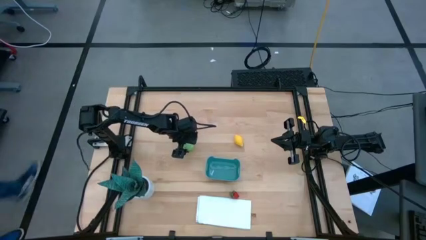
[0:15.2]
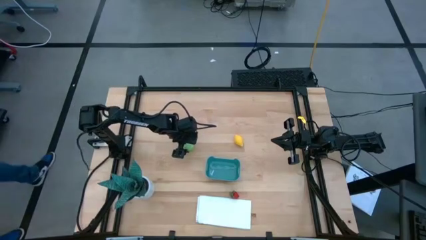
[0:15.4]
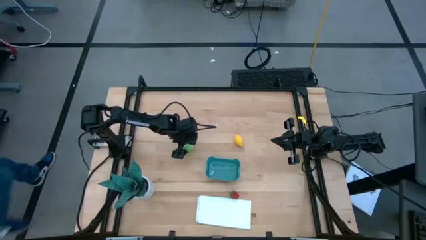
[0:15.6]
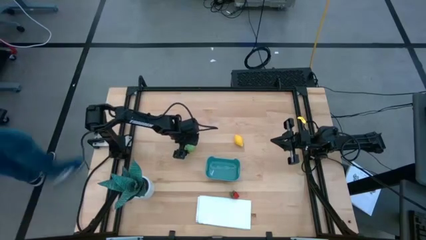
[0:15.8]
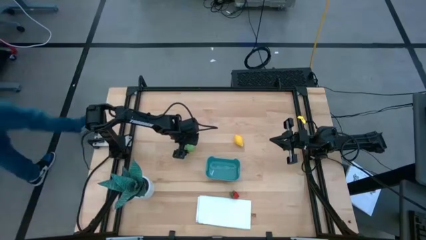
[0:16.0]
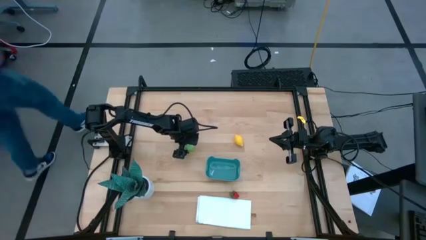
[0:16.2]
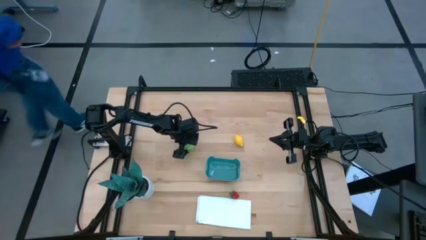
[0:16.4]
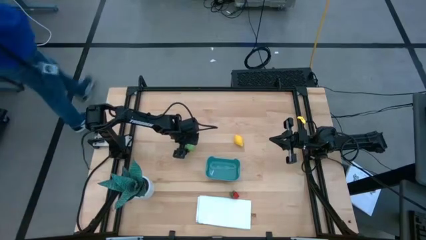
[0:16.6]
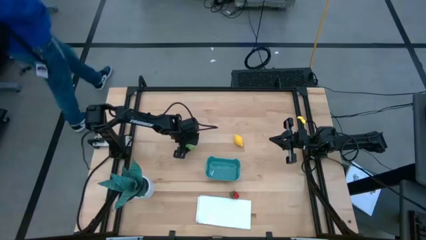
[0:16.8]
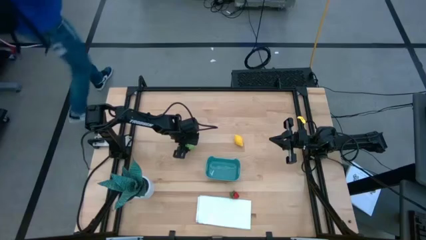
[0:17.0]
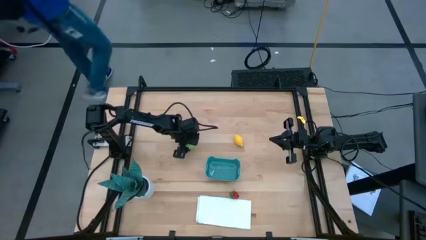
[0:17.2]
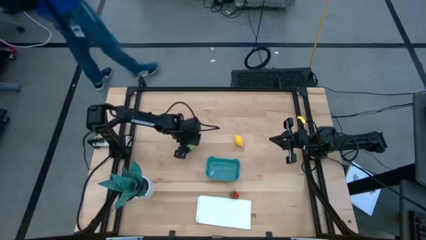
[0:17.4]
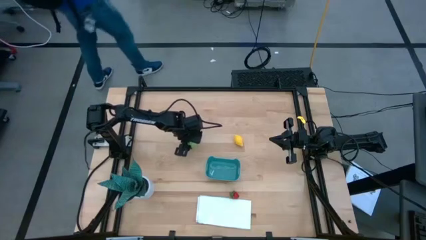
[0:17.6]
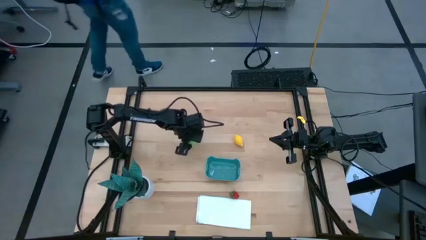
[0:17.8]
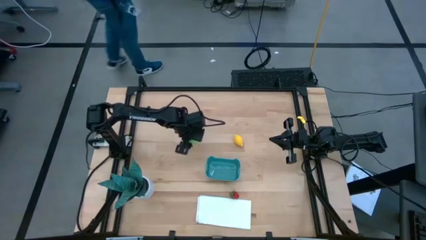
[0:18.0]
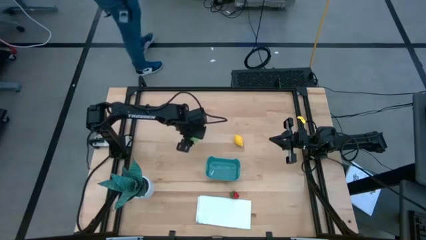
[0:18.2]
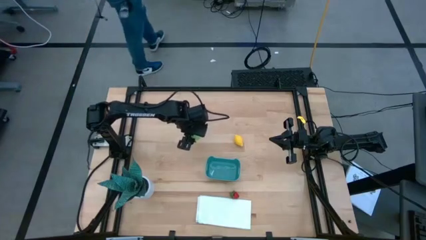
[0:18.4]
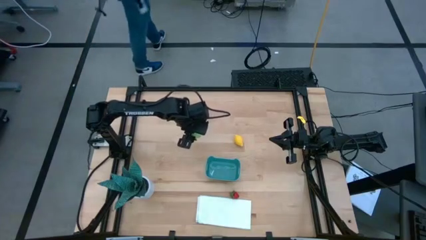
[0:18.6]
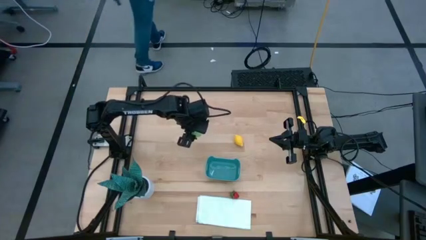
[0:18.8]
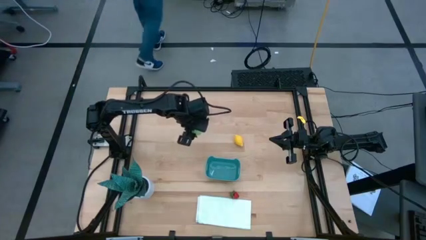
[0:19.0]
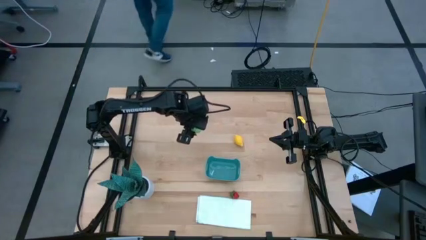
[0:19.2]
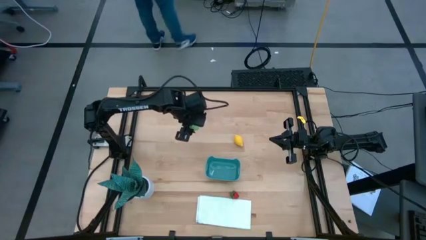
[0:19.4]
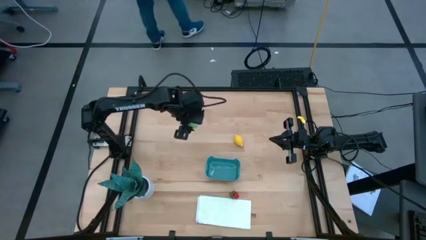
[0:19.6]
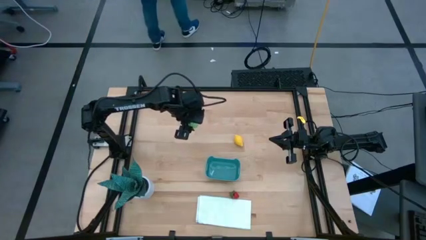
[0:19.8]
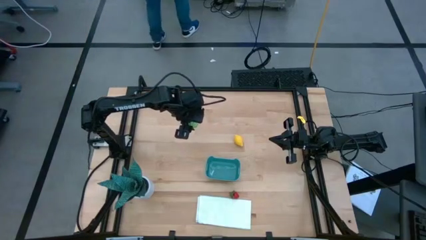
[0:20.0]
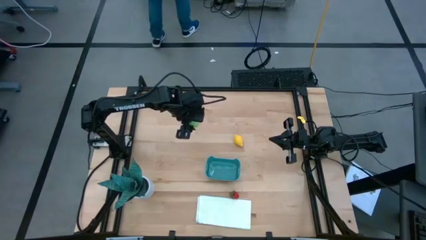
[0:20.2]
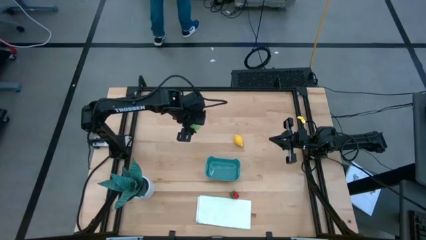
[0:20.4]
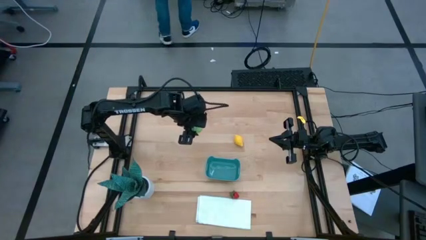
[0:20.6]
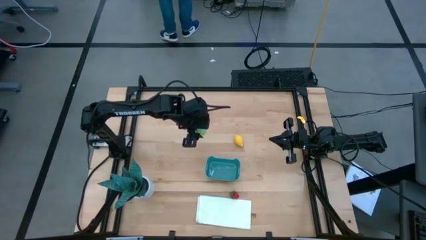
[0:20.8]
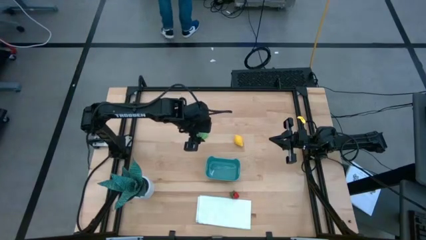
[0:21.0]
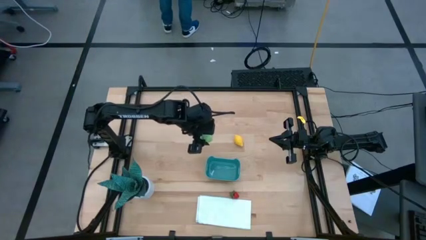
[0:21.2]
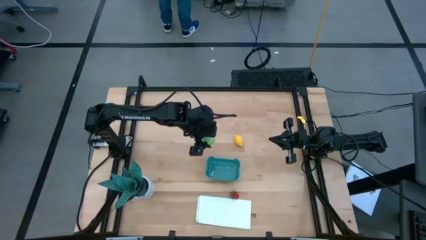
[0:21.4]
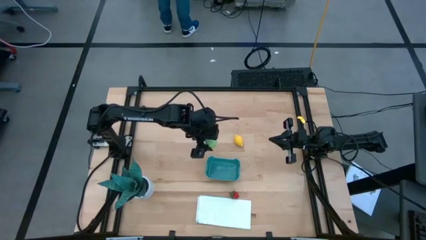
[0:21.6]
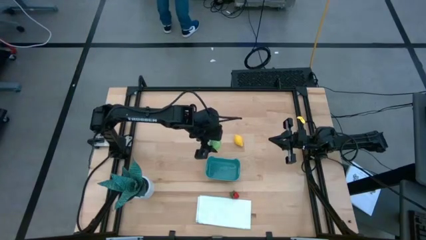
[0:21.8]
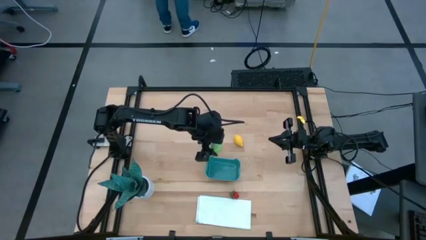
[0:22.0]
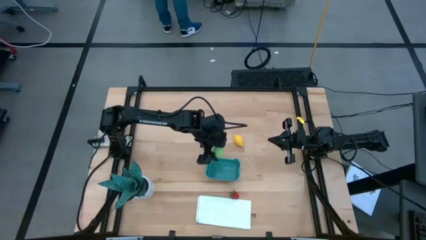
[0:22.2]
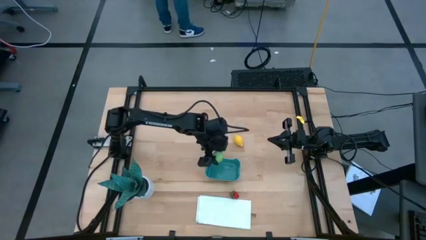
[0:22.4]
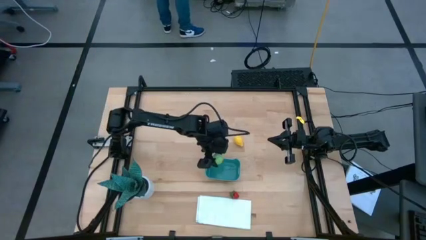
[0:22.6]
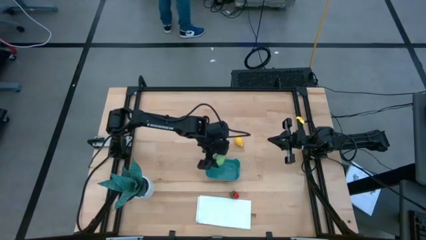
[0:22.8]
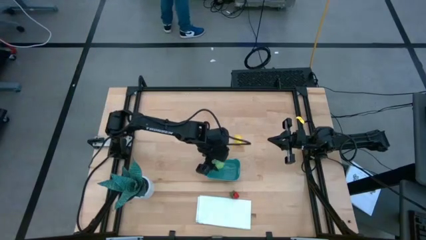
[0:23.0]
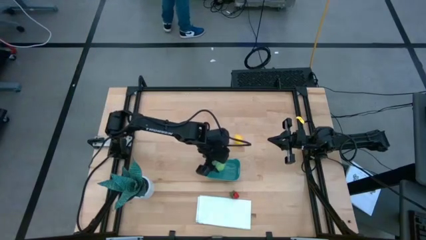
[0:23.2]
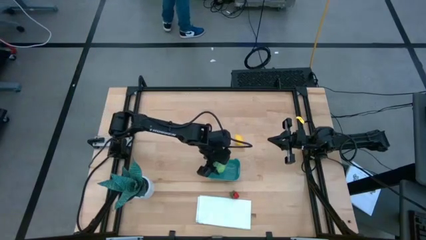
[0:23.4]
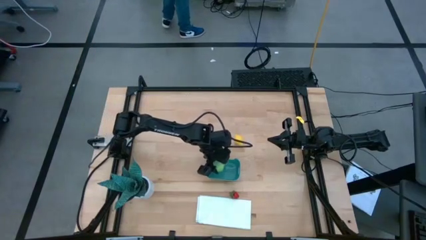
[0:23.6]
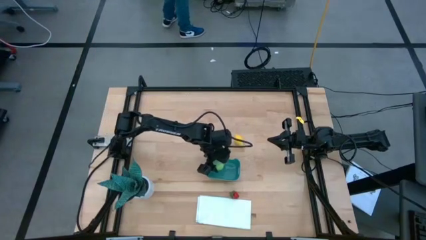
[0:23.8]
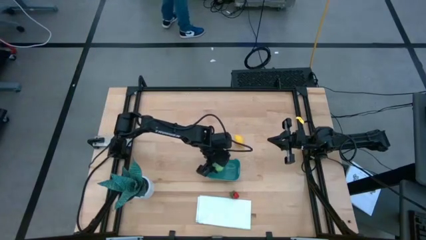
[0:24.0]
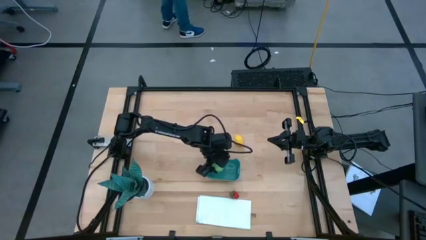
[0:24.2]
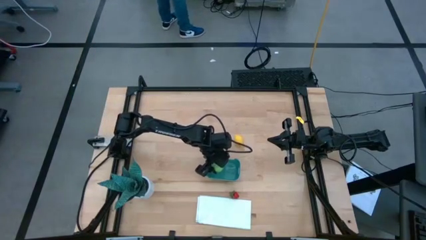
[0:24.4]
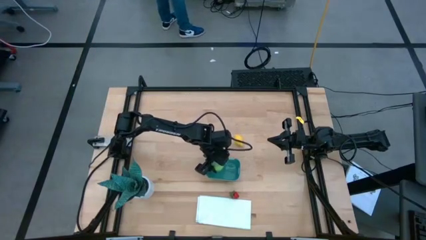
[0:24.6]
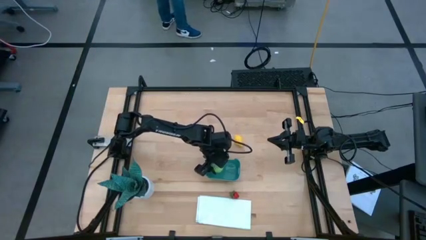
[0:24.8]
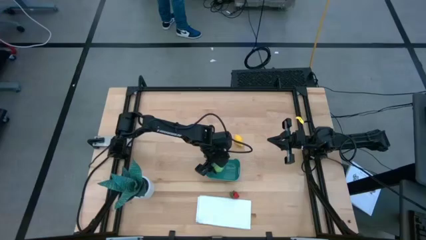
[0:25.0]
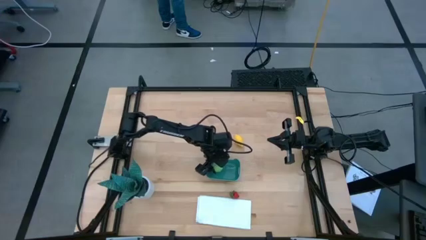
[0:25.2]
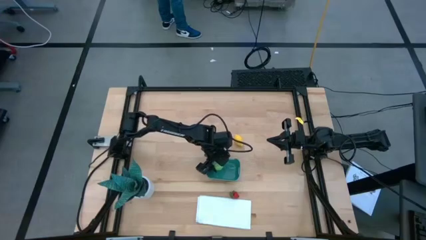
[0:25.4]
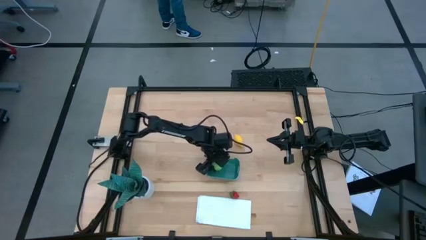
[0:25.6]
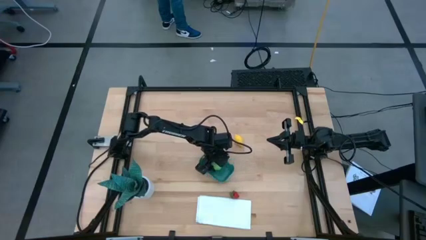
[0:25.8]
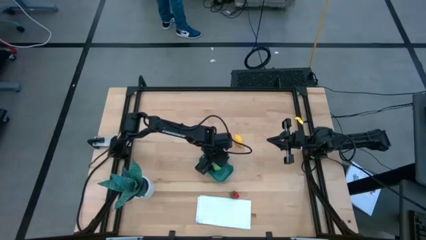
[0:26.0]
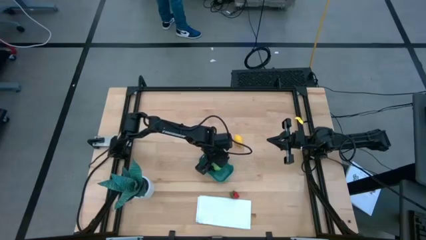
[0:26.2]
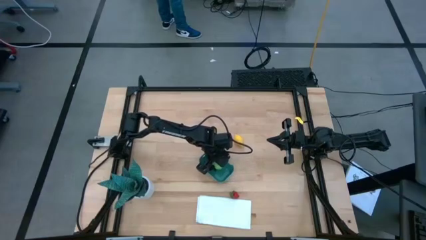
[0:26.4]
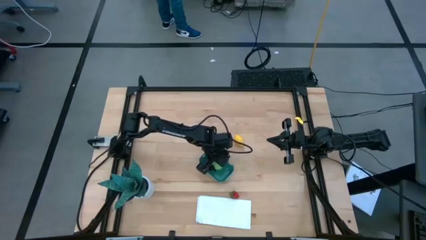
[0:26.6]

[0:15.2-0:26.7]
Task: Pick and placing Produce into tupperware
Put the cabbage into the green bin

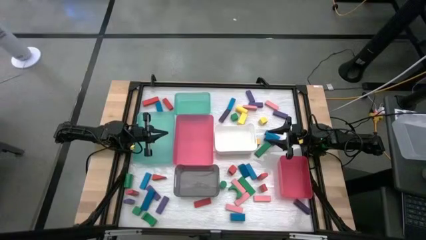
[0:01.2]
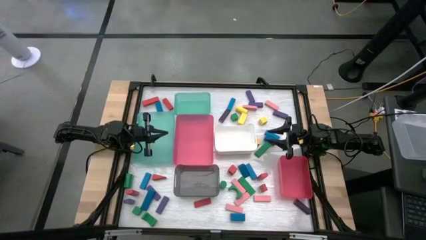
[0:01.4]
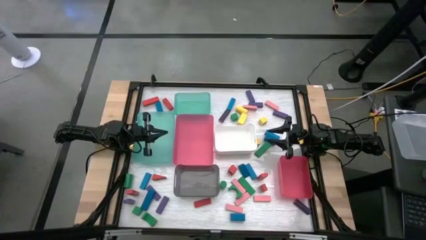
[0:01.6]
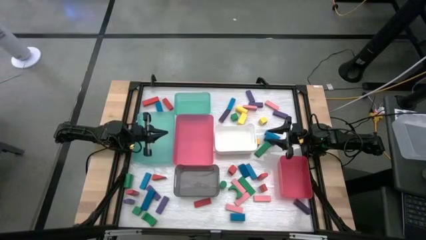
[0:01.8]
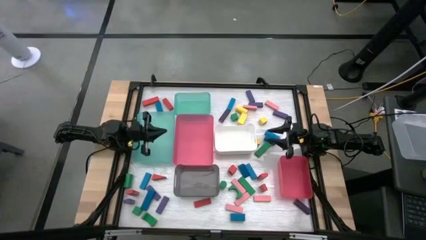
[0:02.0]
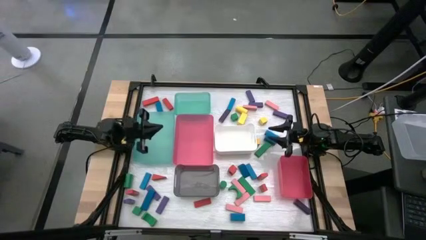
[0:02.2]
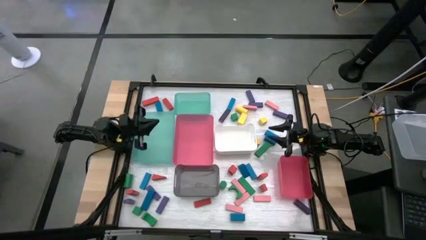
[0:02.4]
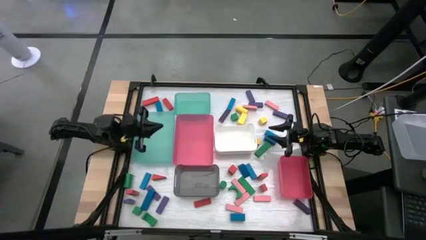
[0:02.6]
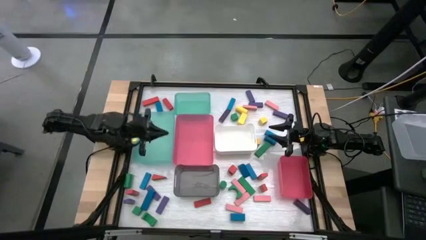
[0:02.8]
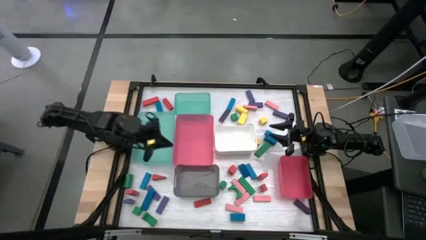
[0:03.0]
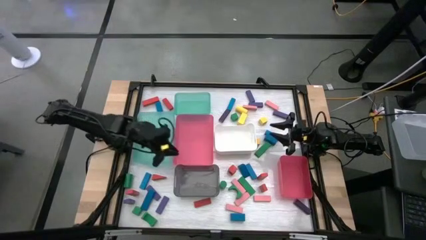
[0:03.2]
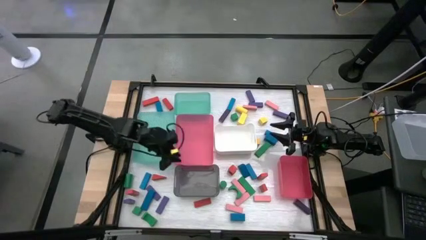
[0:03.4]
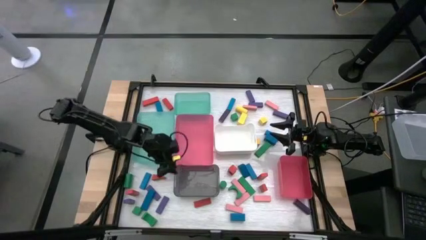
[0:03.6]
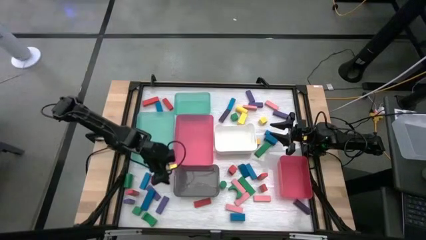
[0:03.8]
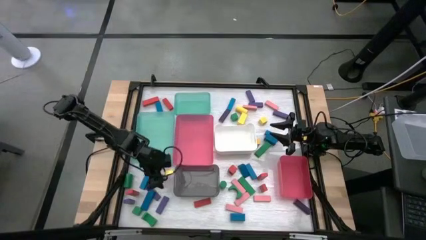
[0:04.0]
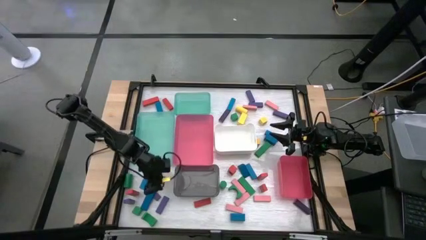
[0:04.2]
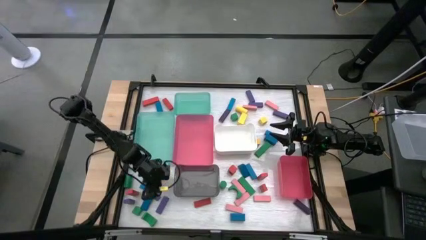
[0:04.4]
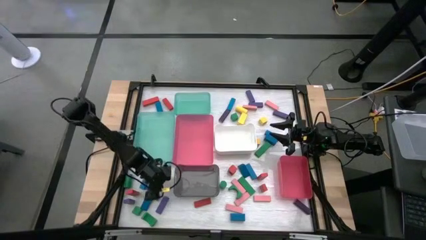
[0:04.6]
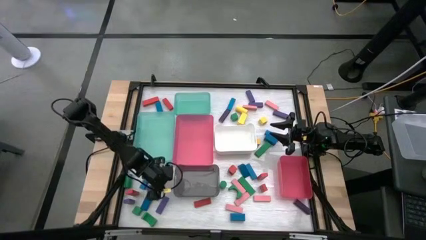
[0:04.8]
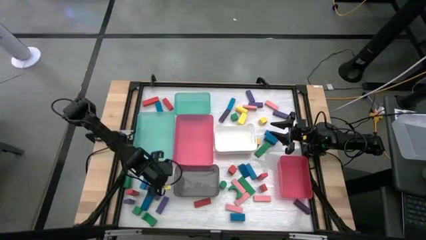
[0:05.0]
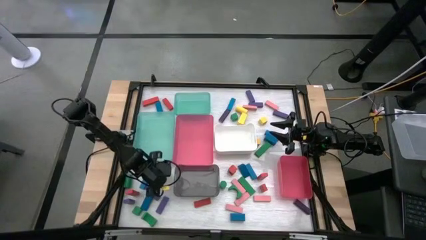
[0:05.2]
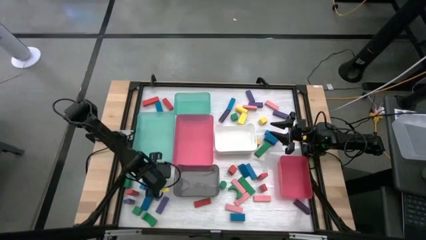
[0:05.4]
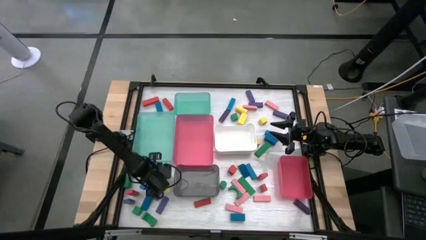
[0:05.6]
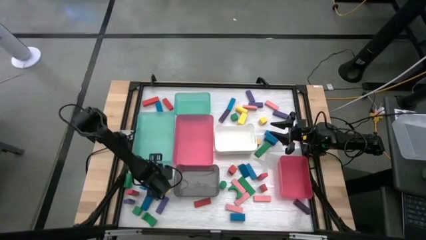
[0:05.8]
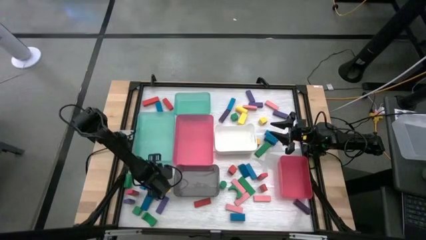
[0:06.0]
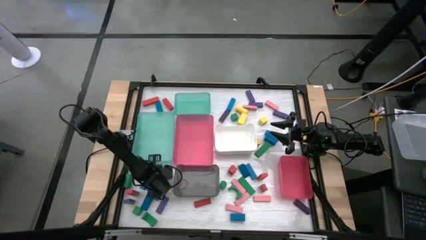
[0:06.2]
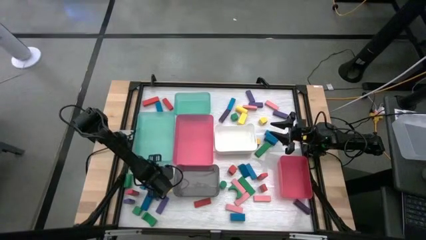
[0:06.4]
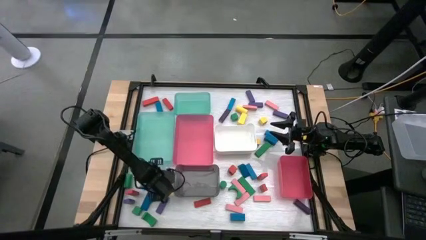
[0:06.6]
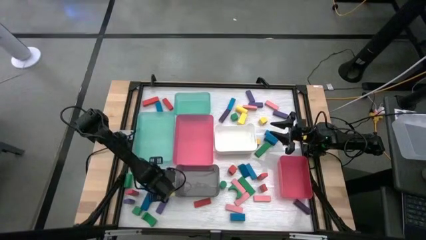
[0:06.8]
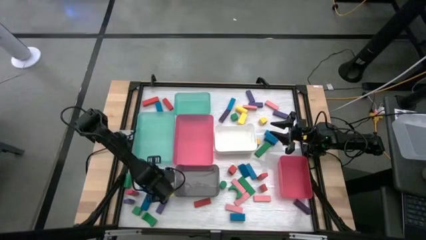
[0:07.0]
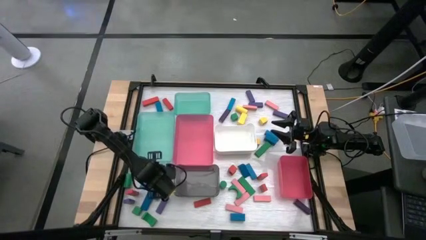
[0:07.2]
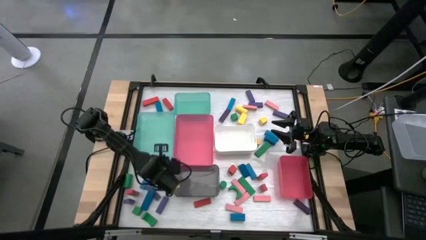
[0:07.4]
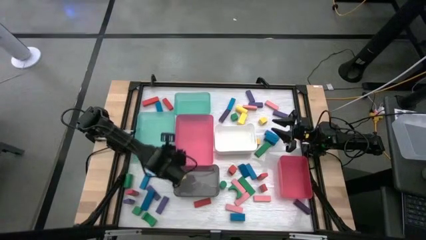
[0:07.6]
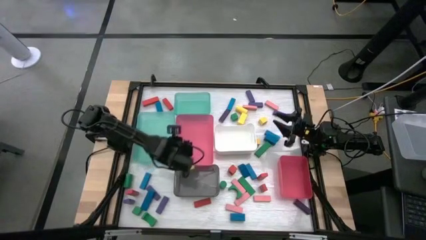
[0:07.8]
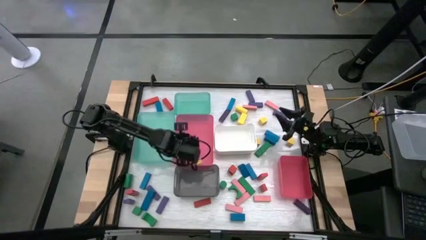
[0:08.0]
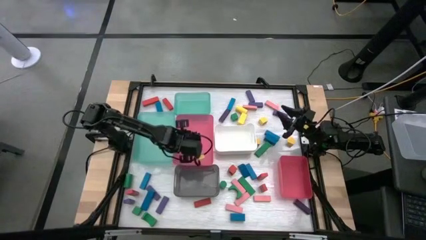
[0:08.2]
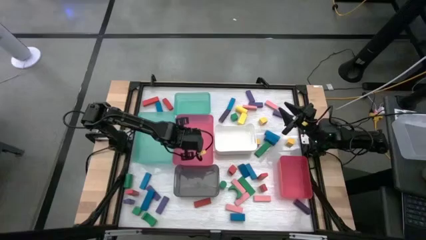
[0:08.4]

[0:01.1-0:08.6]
Task: Sort blocks
Put the red block into the top pink bin
